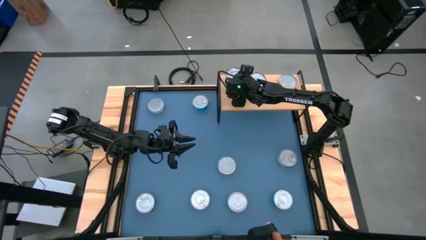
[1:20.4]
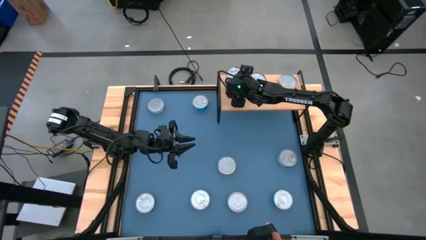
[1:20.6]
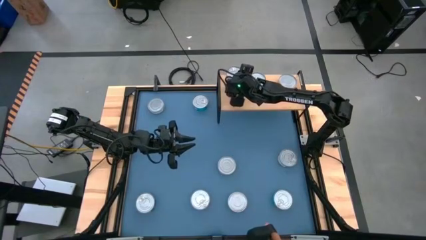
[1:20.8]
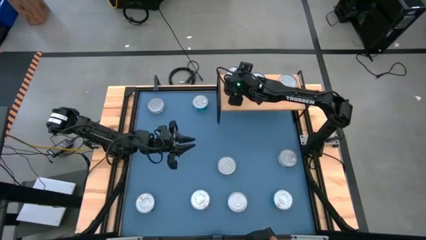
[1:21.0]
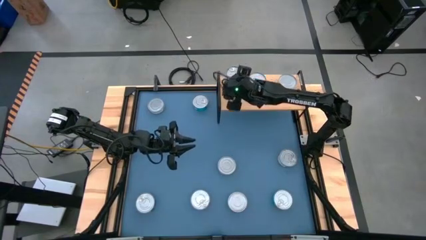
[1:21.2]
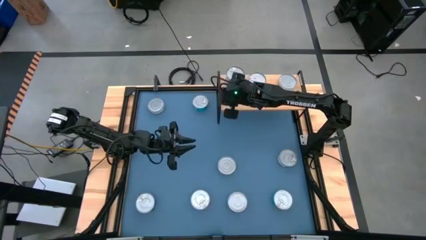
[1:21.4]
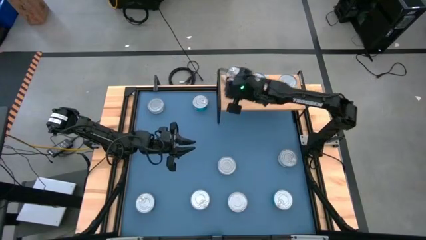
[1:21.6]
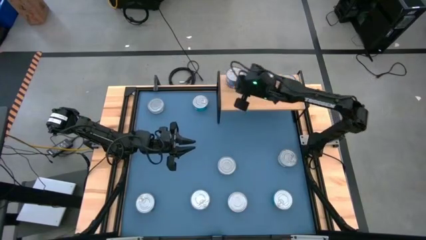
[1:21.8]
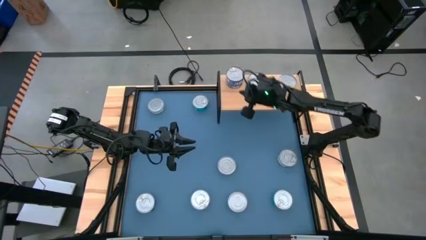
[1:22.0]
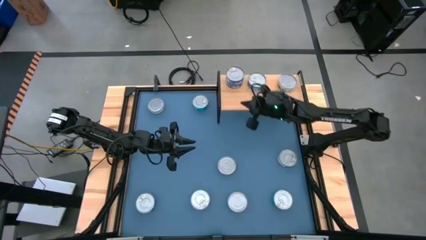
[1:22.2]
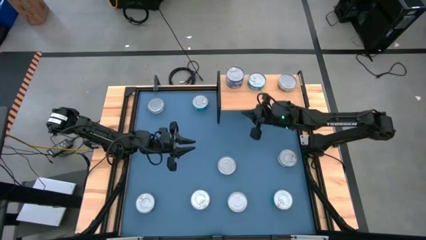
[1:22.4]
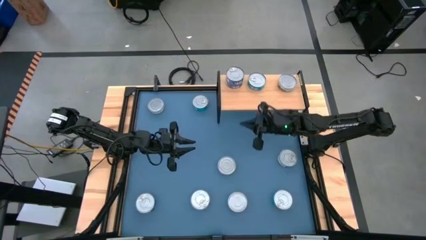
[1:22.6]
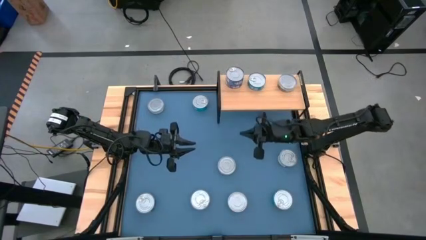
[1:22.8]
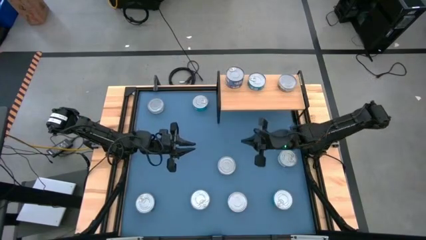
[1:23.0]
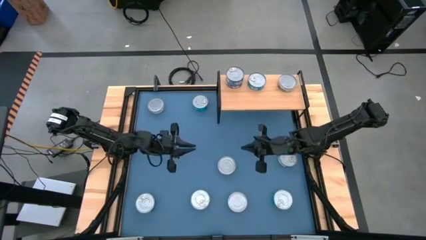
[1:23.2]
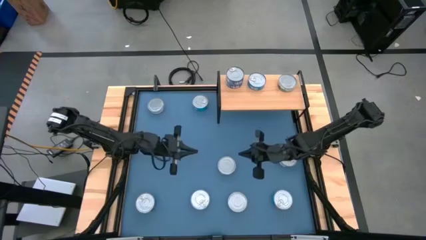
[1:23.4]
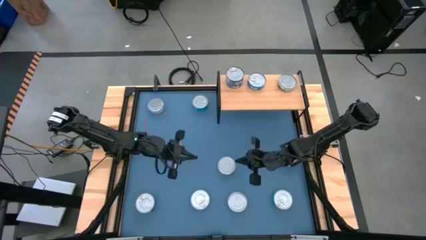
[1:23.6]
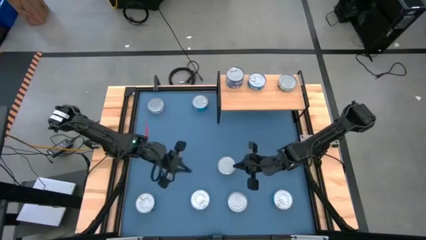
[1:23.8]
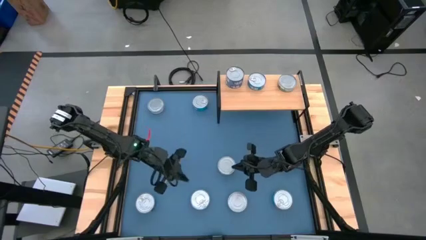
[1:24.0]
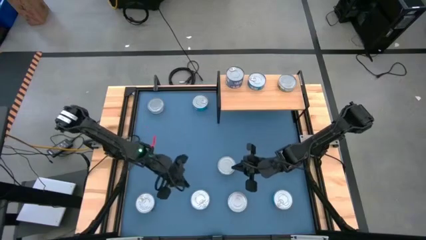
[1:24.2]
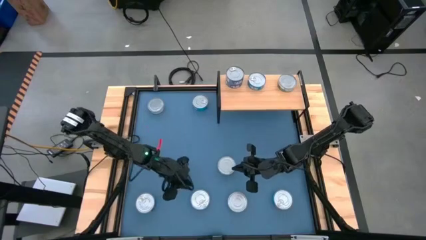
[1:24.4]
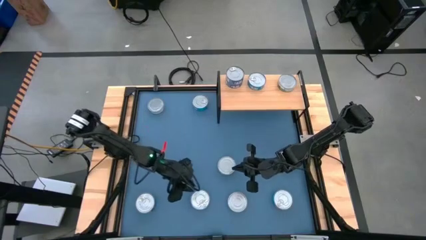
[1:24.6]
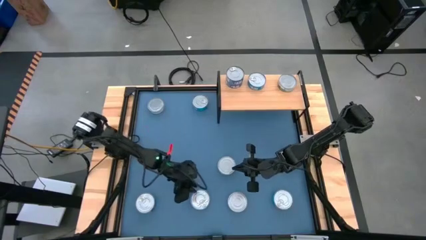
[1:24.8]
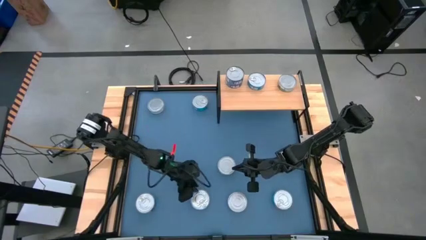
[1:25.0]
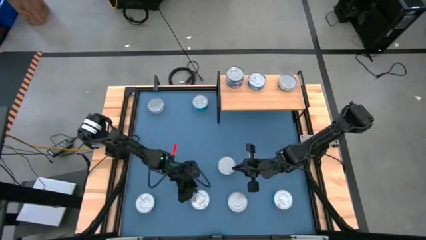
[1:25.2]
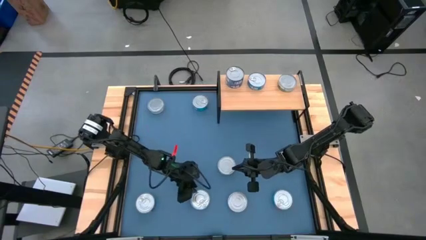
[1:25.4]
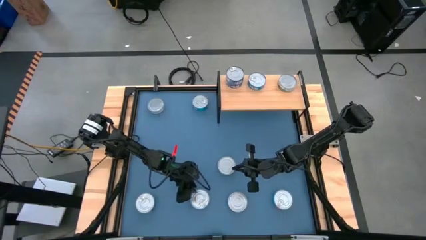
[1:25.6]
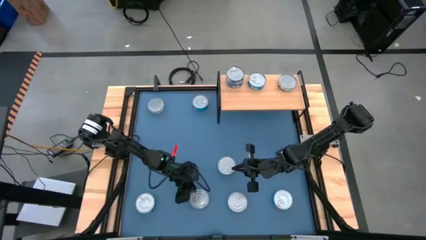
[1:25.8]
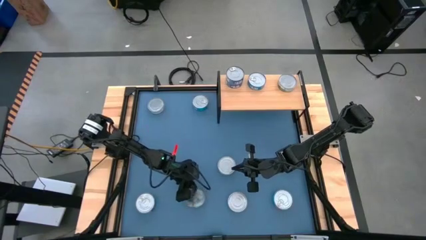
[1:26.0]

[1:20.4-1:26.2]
Task: Stack canned seafood by type on shelf
Stack the bottom left light blue tuna can on top of the light blue tuna can on the shelf

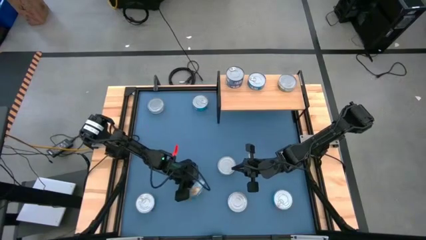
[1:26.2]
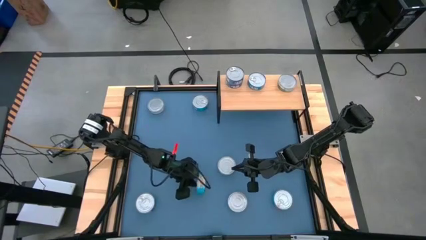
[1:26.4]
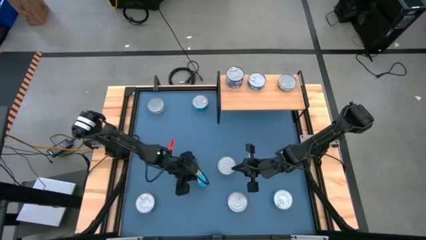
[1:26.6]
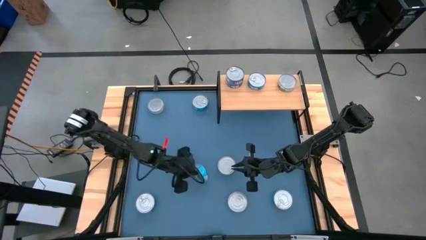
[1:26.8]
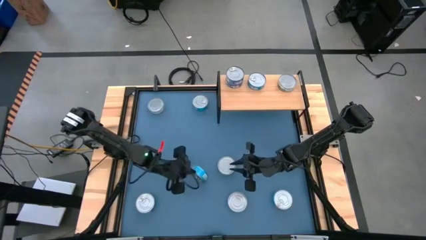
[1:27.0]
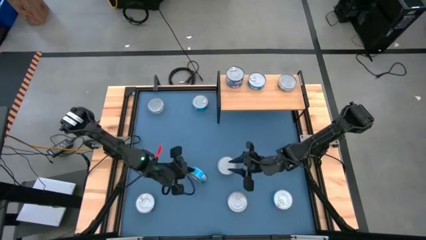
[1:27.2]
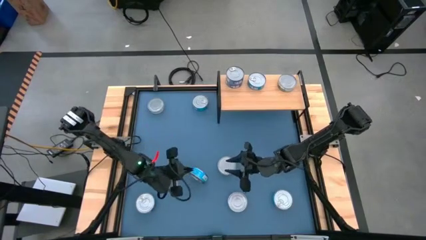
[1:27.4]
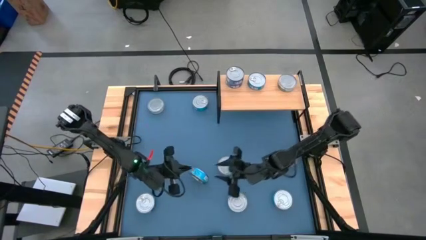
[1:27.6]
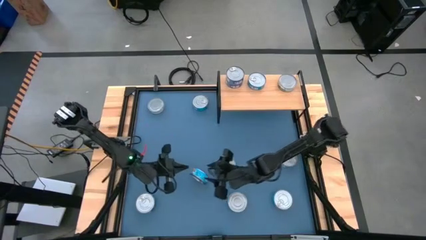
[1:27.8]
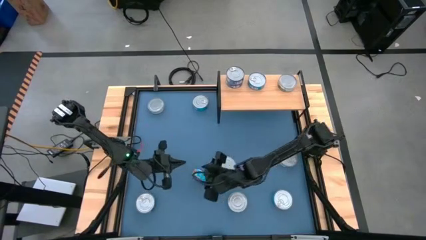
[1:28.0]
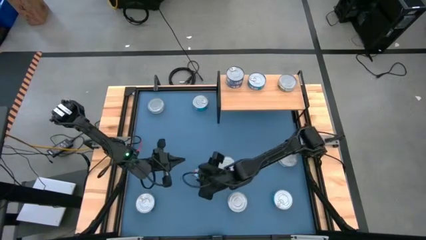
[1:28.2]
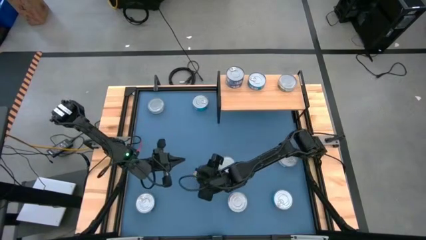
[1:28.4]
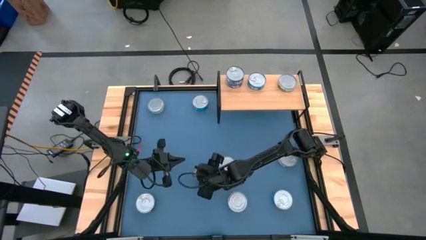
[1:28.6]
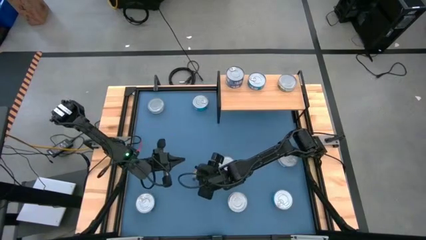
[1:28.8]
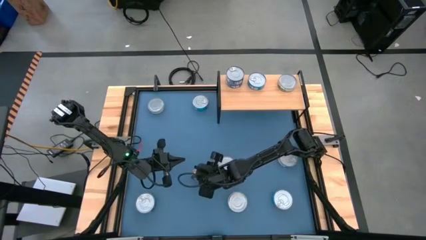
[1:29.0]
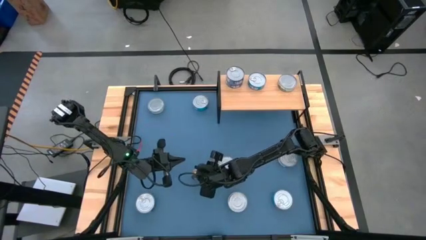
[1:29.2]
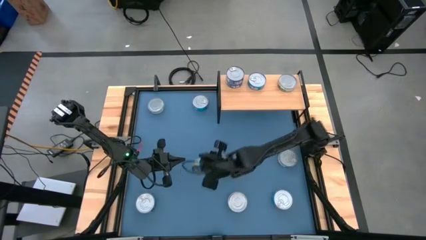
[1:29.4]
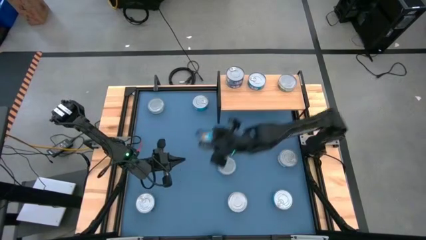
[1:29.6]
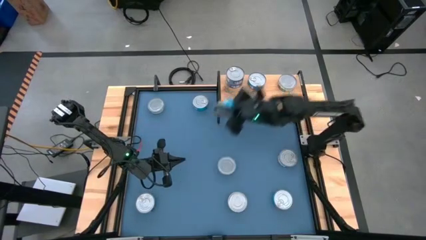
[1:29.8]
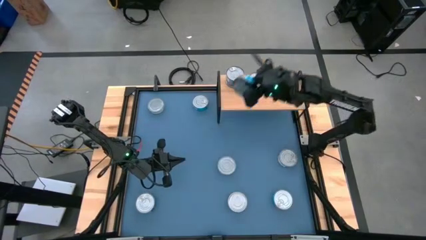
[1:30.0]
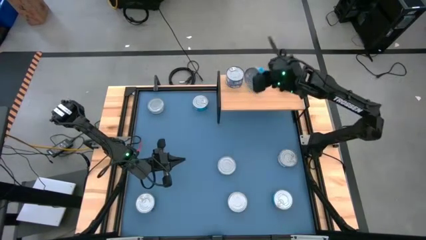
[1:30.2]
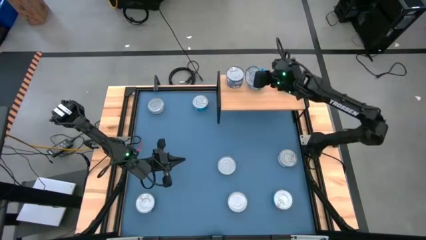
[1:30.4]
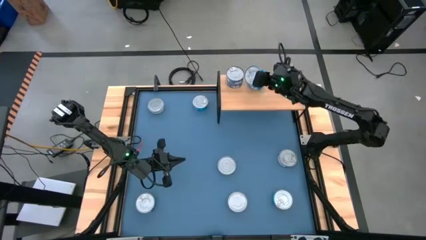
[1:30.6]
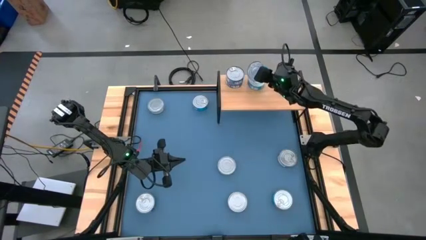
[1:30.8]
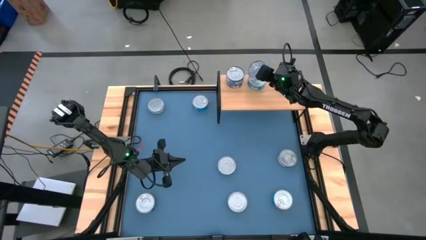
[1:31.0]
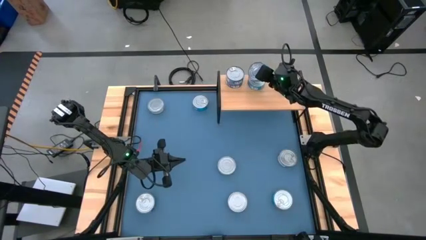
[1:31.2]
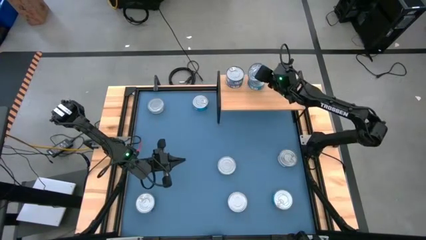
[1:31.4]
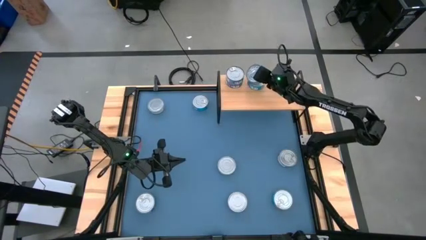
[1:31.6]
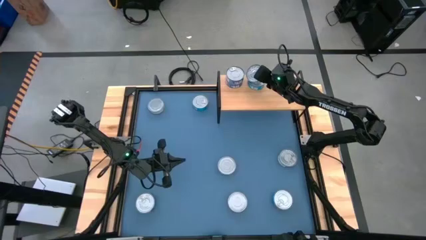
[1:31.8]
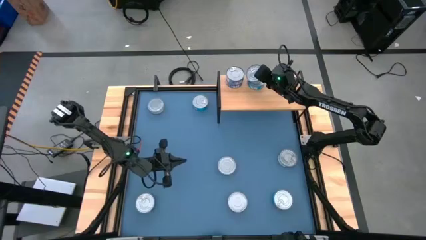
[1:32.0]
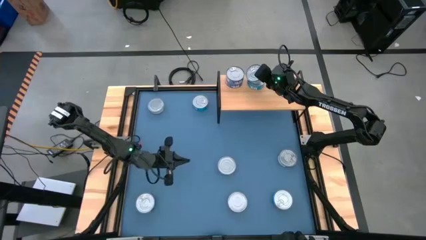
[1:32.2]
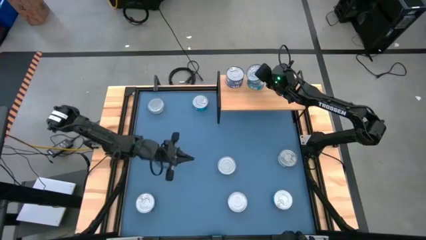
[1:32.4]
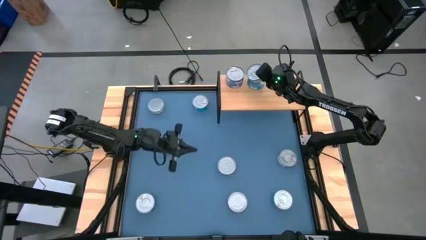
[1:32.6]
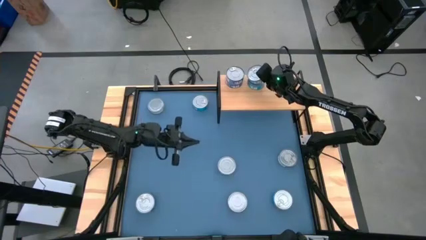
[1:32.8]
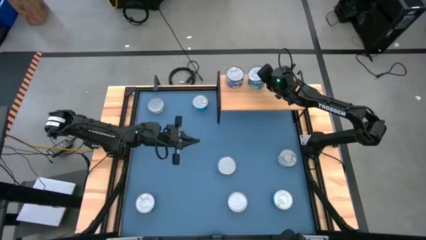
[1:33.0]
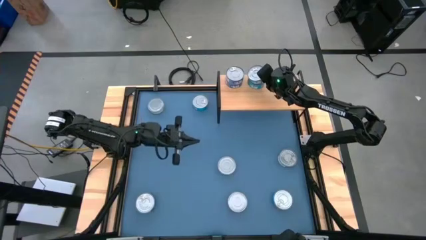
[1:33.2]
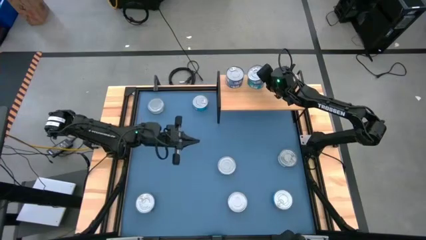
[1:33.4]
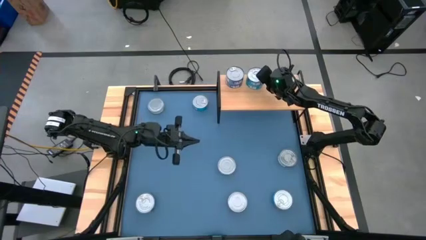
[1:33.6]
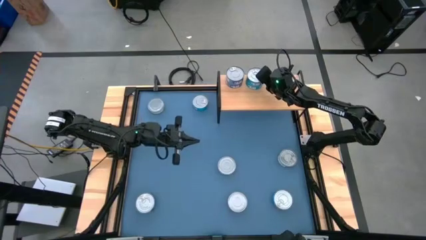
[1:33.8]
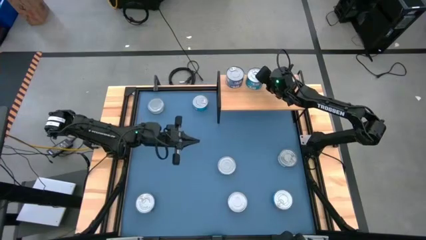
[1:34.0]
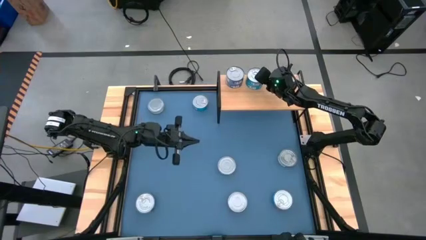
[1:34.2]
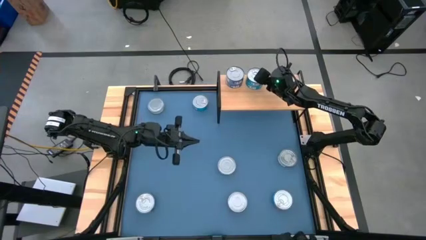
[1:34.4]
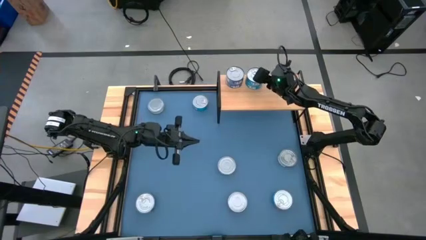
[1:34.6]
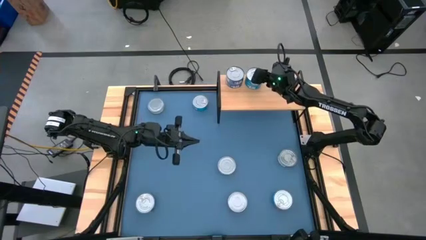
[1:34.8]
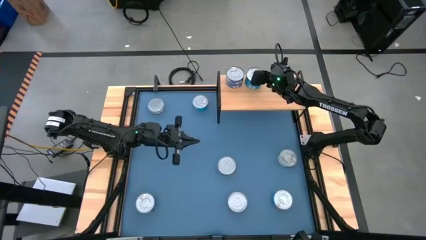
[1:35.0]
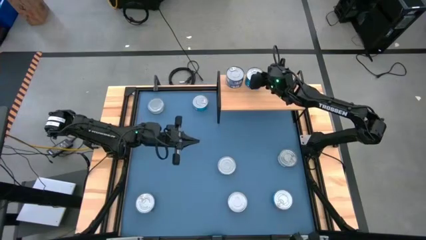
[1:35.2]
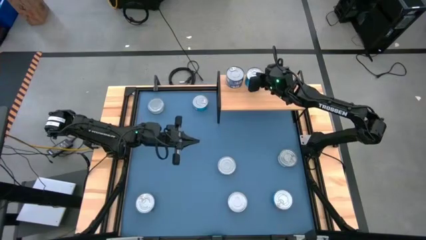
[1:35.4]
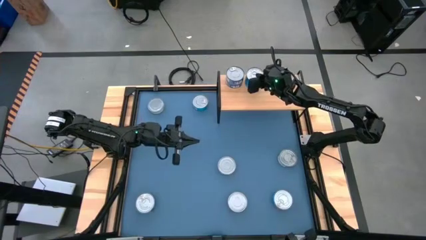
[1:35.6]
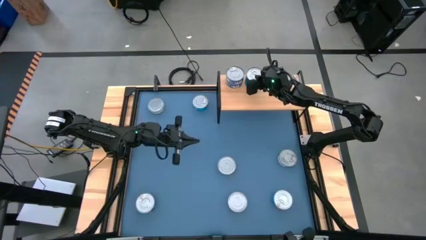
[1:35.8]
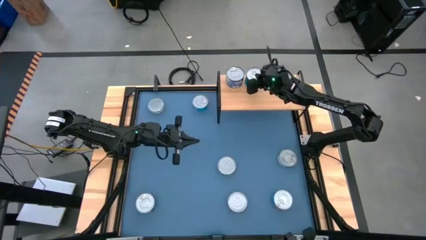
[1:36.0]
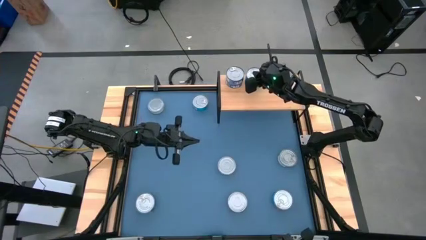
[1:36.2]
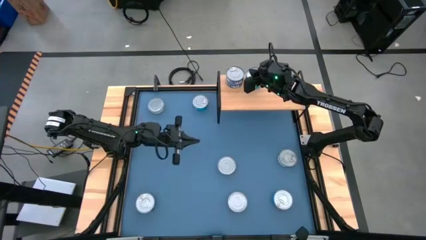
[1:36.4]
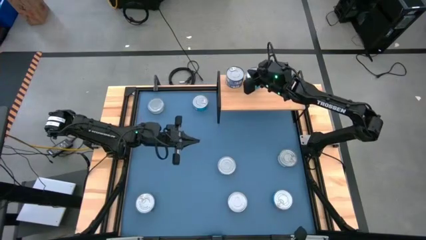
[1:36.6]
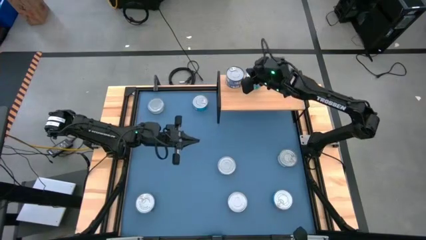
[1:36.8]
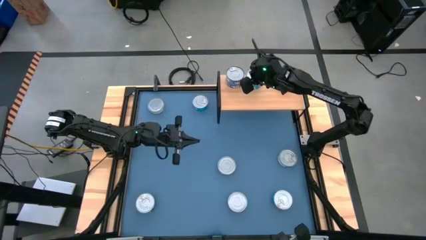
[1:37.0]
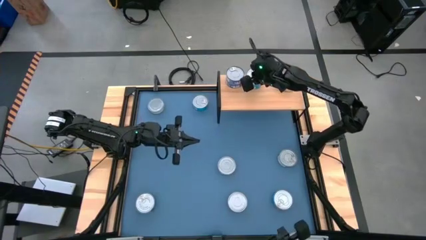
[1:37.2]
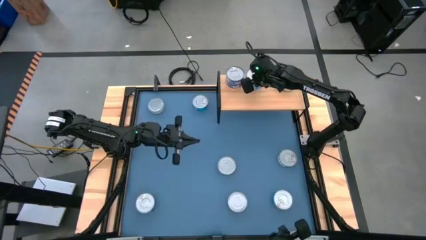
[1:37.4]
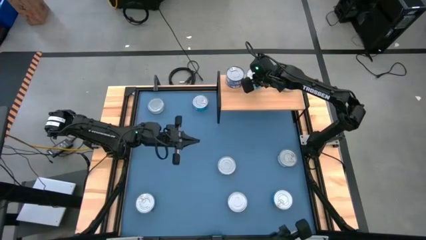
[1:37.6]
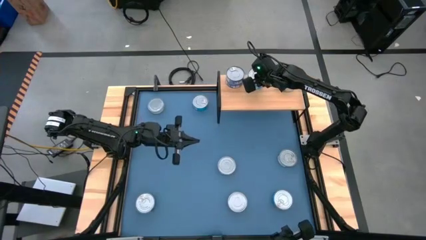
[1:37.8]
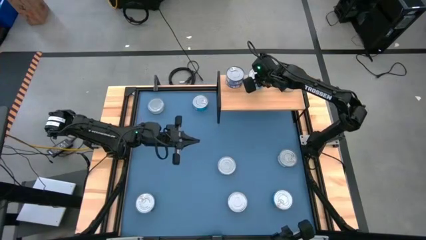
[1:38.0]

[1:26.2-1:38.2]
Stack the center light blue tuna can on top of the light blue tuna can on the shelf
